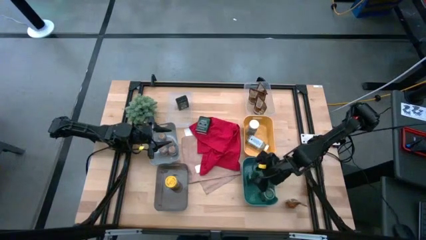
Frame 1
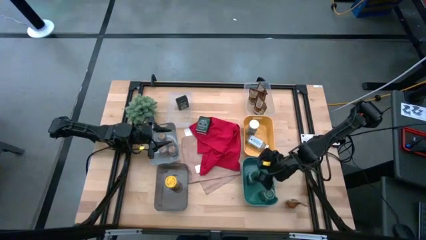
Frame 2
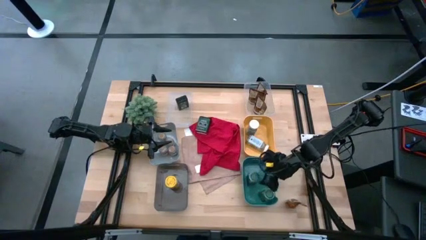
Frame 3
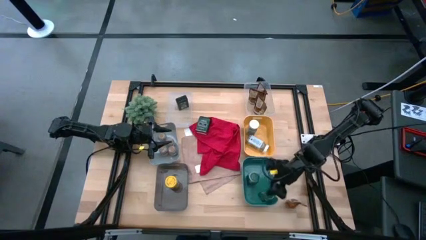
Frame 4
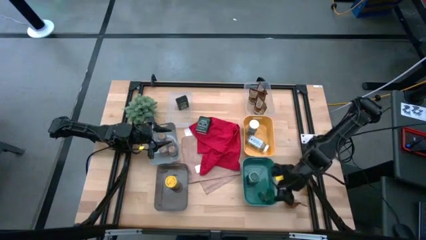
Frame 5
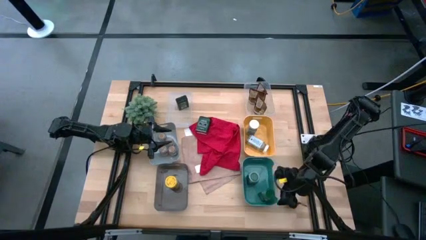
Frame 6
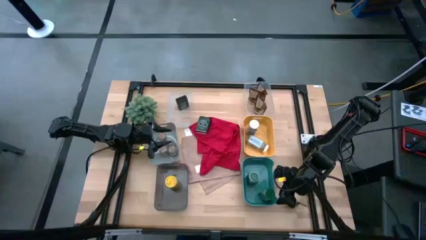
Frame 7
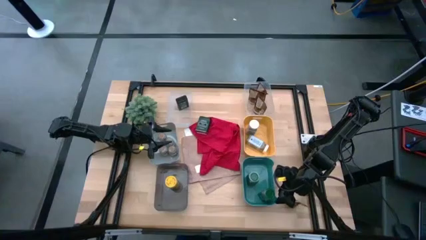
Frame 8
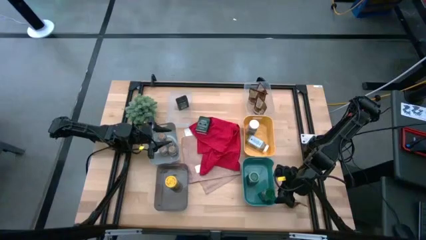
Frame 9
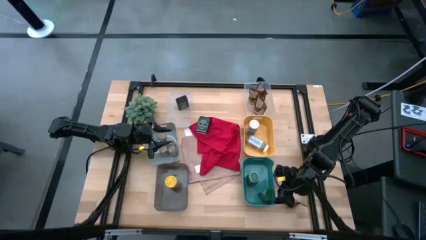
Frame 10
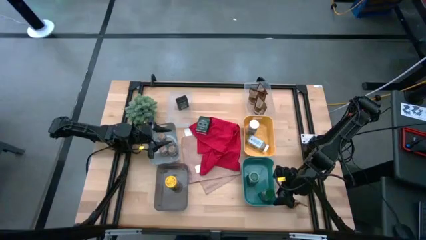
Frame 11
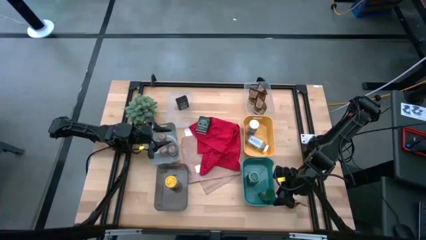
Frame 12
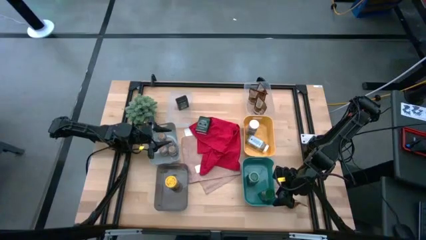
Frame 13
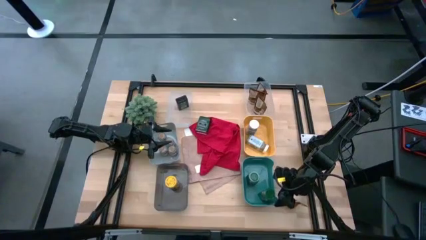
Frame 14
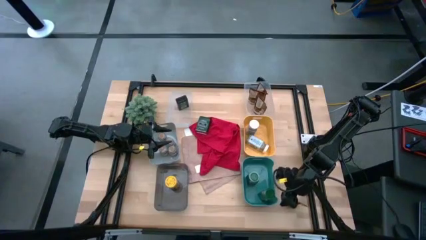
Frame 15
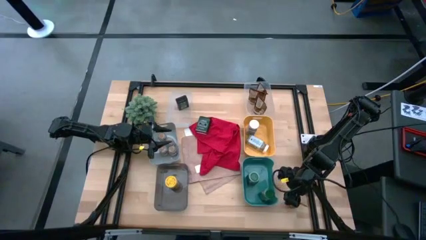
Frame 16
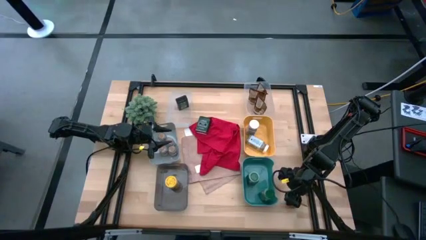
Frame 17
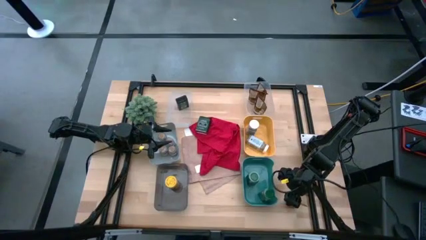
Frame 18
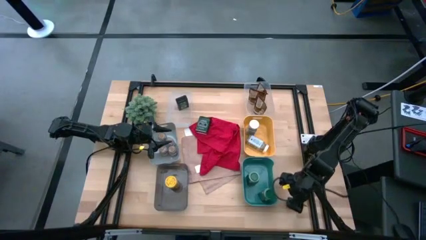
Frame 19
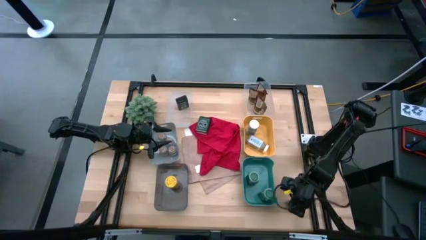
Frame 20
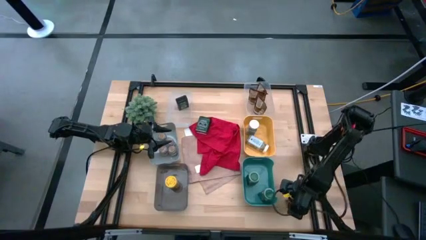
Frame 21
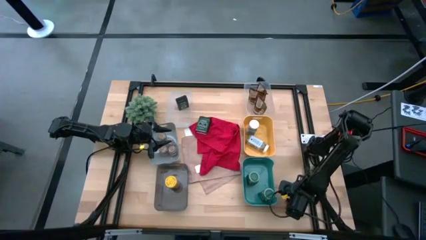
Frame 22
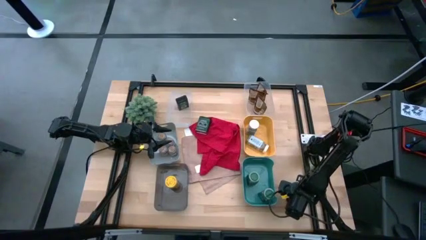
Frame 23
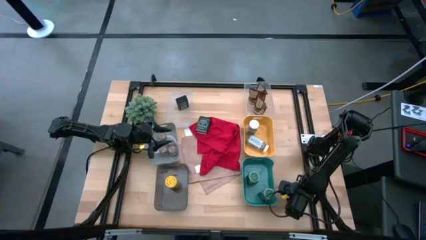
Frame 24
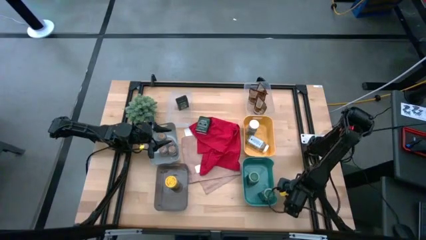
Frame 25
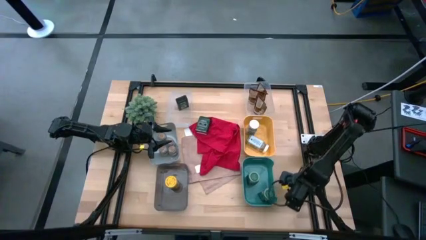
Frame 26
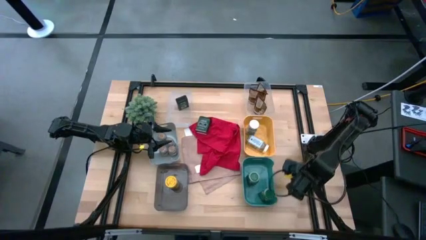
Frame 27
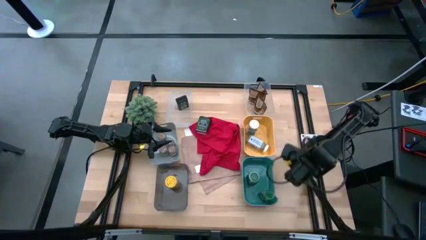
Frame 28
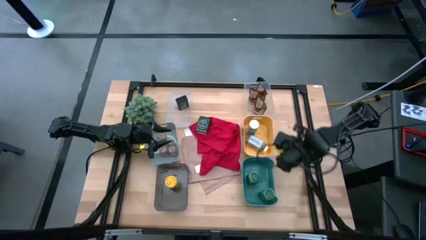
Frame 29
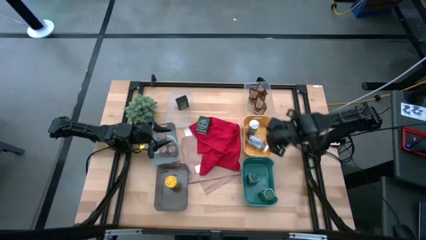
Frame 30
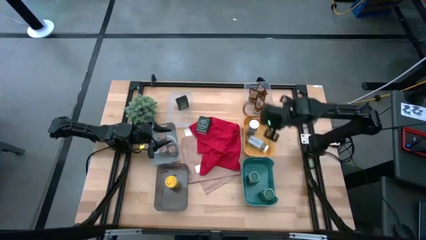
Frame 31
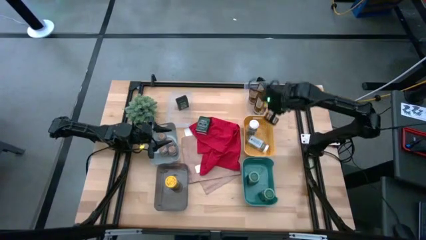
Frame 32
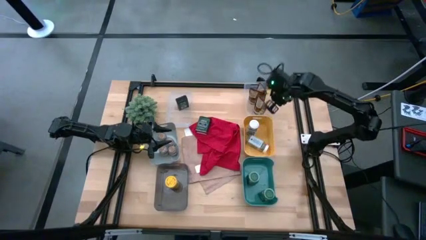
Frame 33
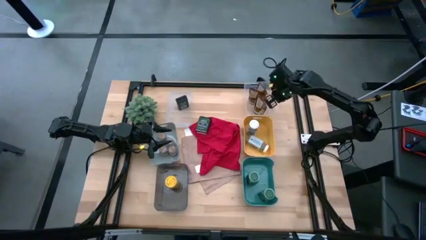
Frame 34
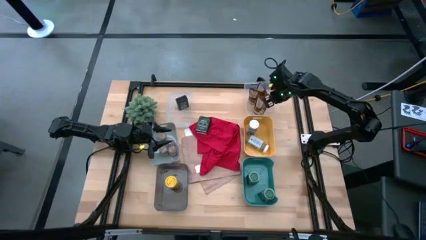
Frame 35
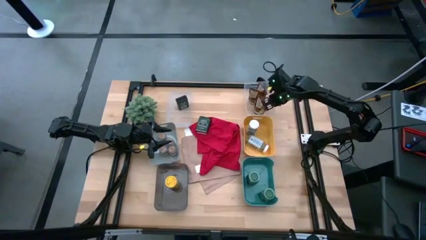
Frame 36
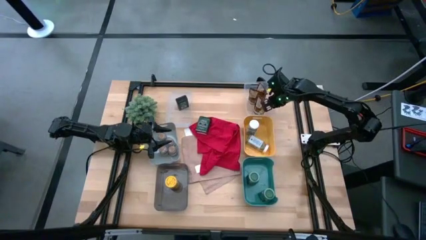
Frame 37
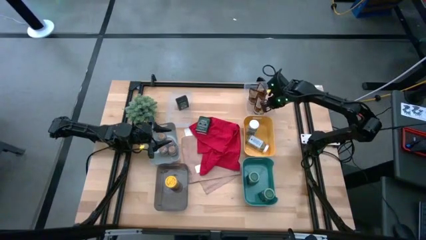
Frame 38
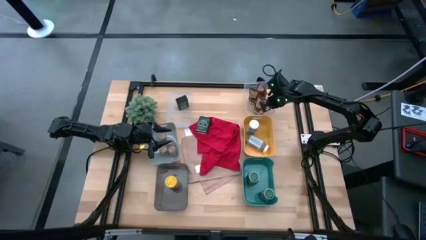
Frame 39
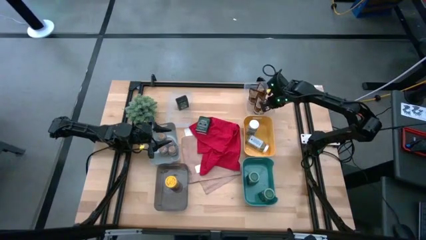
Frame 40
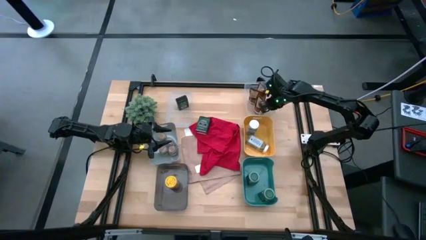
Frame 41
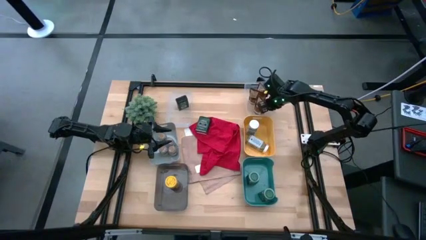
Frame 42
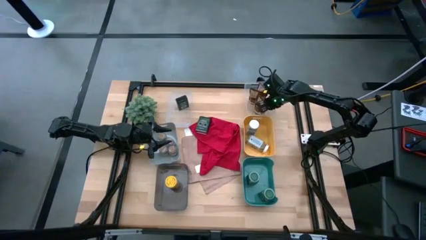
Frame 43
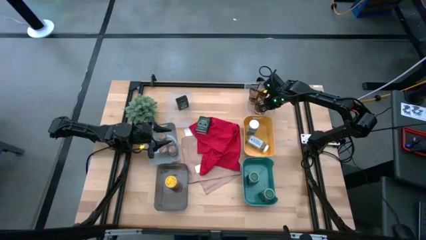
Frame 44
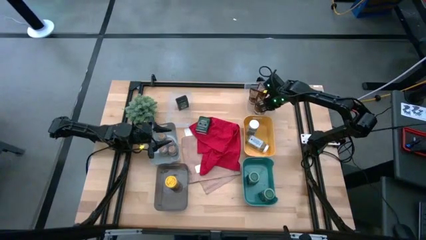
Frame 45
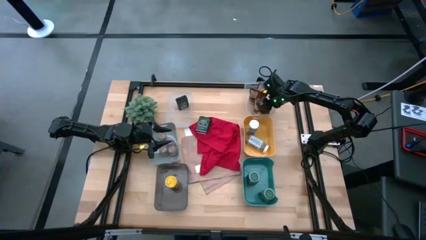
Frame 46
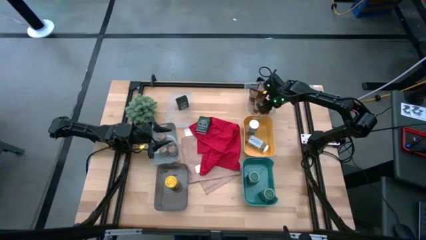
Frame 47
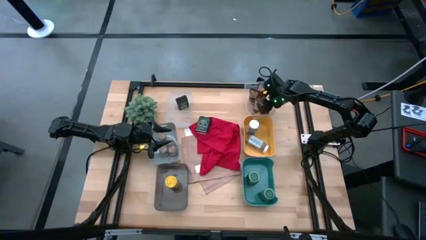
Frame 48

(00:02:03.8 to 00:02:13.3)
Task: Sort spices by type
Put the orange seasoning bag into the right transparent bin

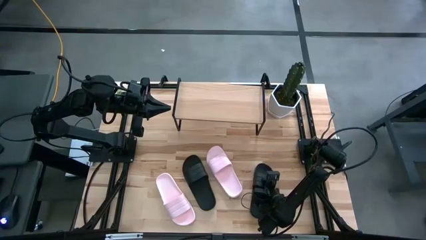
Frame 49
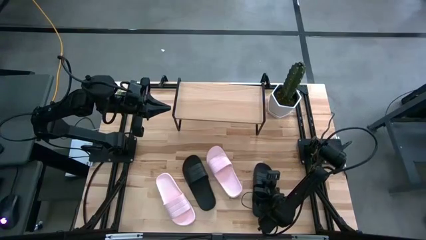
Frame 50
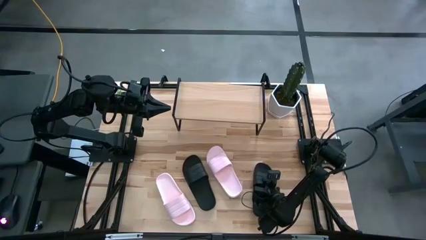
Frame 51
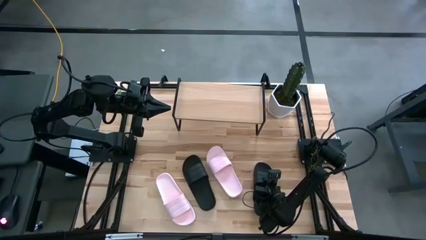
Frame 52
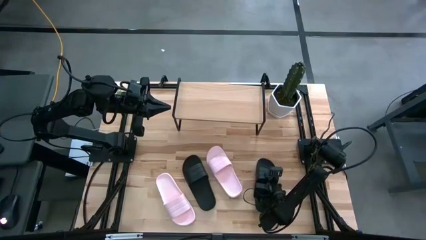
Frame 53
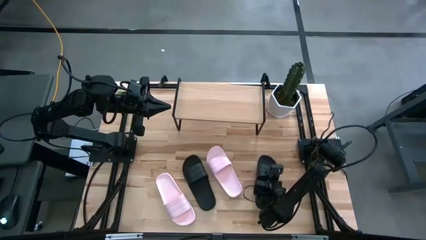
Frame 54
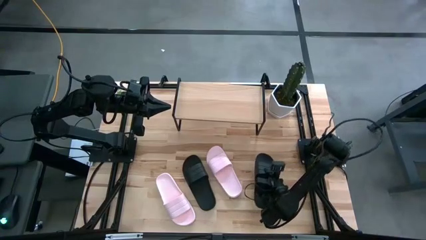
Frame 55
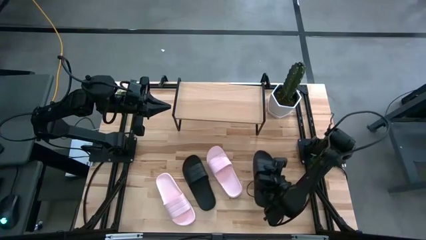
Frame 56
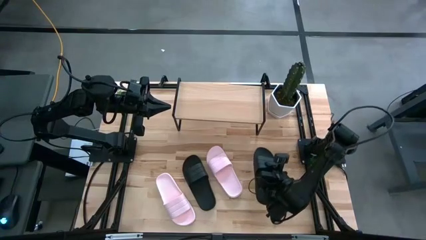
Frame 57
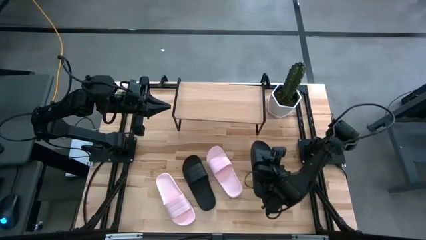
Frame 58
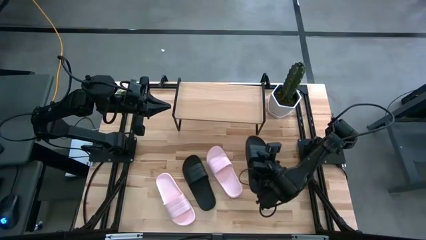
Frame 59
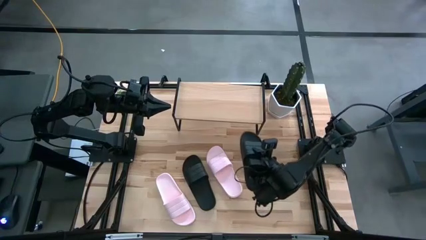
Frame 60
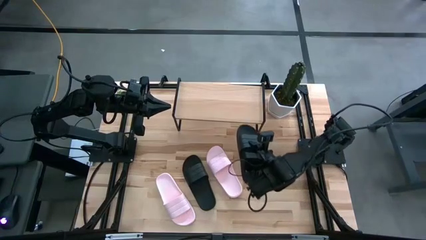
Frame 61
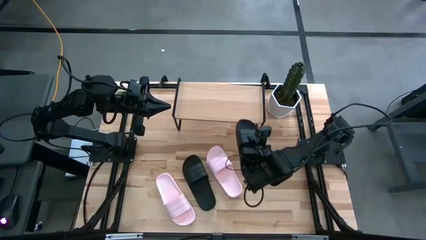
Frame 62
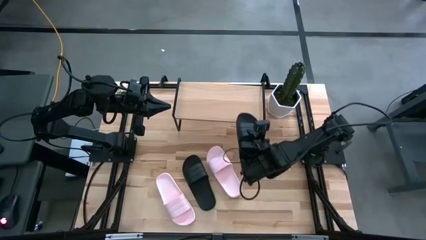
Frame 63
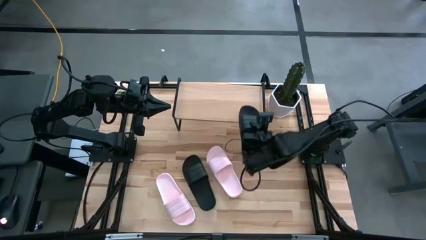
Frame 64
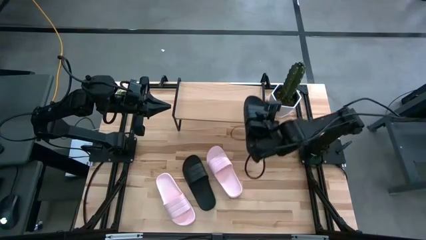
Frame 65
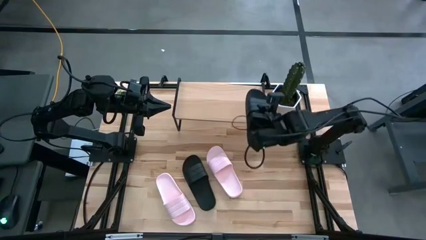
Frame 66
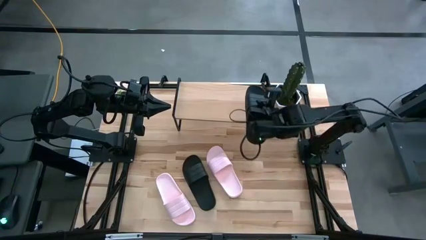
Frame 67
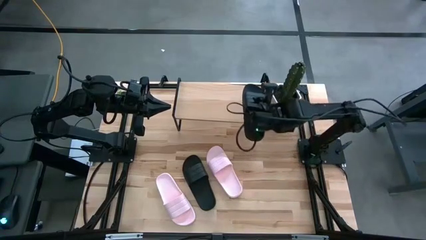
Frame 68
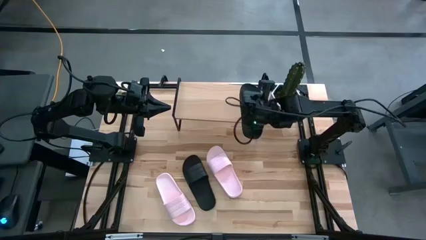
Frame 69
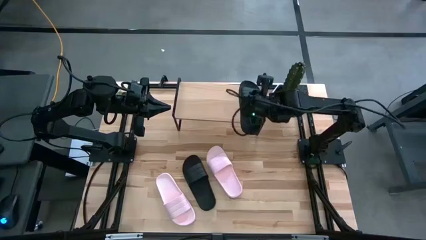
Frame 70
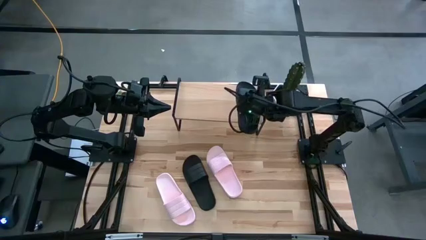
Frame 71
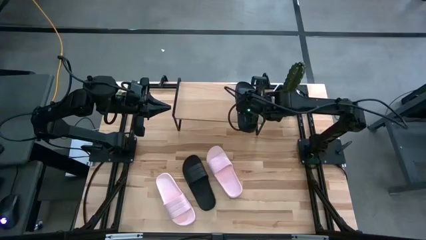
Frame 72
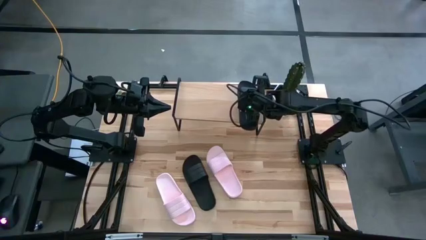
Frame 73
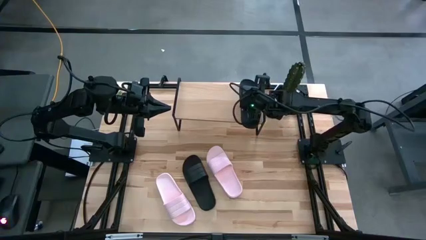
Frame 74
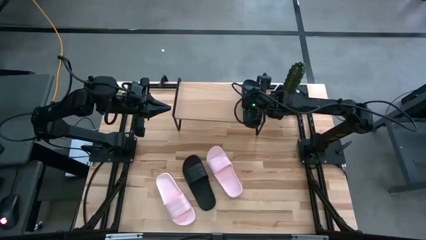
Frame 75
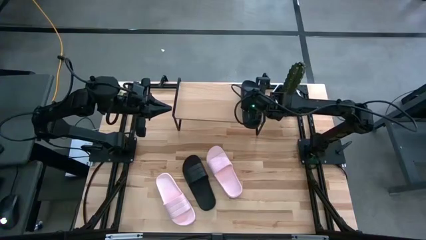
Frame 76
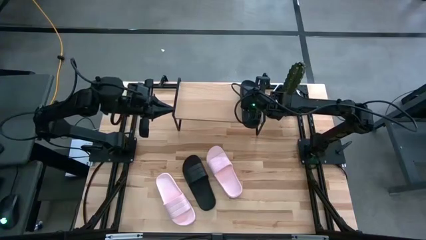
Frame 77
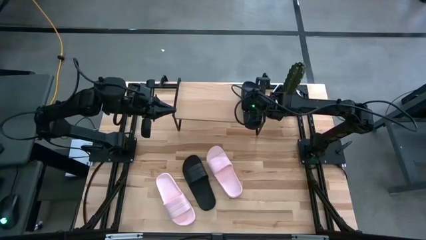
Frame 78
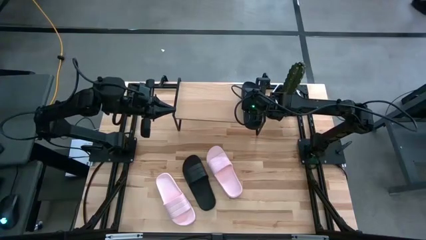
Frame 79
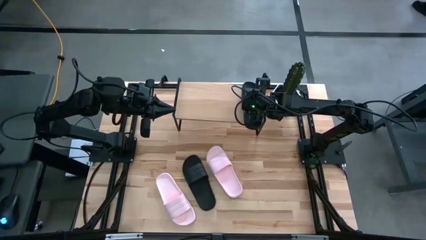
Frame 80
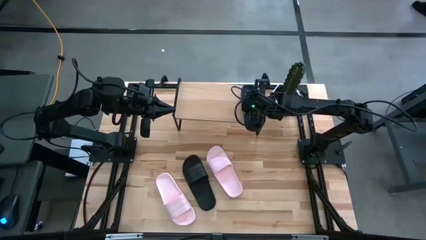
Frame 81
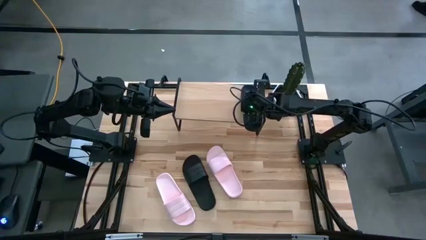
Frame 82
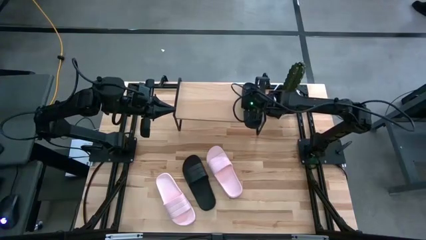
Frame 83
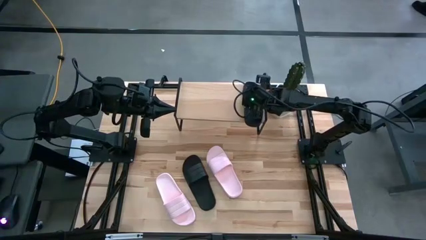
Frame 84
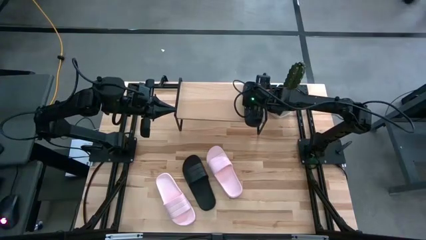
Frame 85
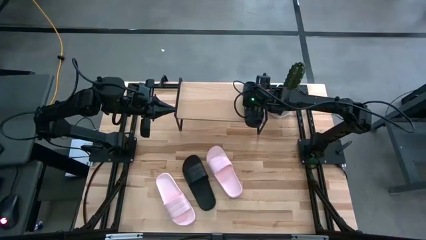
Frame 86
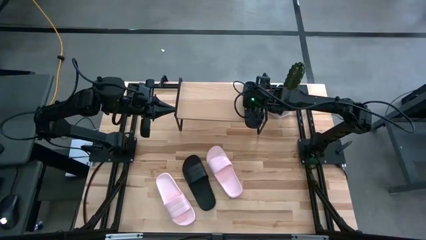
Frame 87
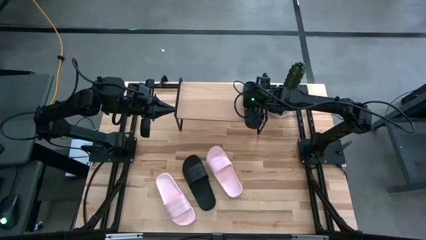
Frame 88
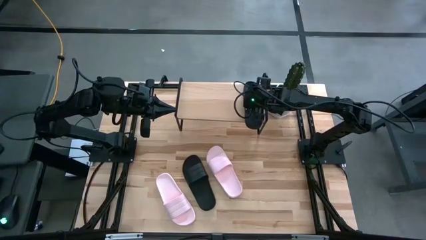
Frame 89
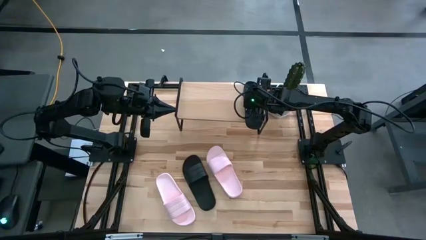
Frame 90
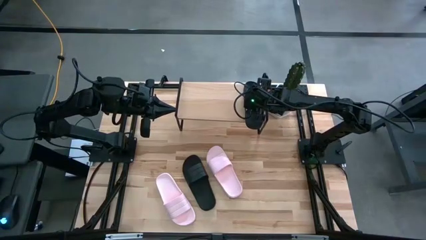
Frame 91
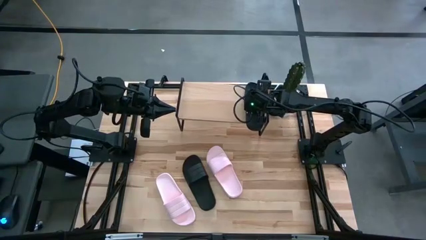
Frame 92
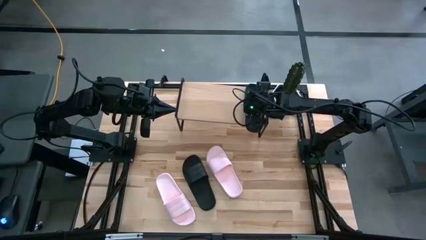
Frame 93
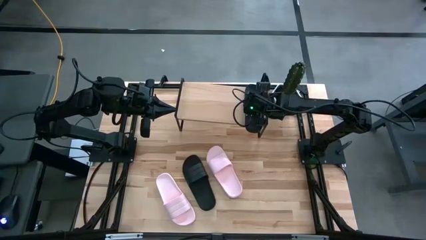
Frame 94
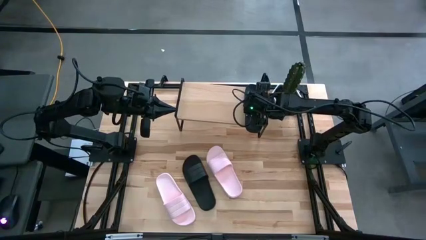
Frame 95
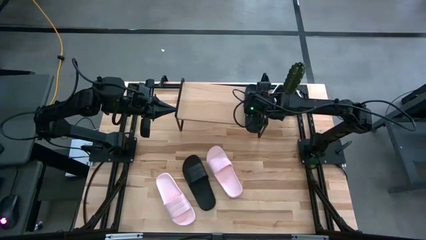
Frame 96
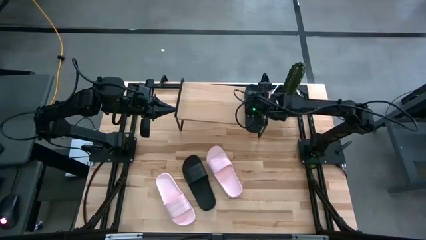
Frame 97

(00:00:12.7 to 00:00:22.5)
Task: Pick and place slides into the shelf
Put the right black slide on the shelf
